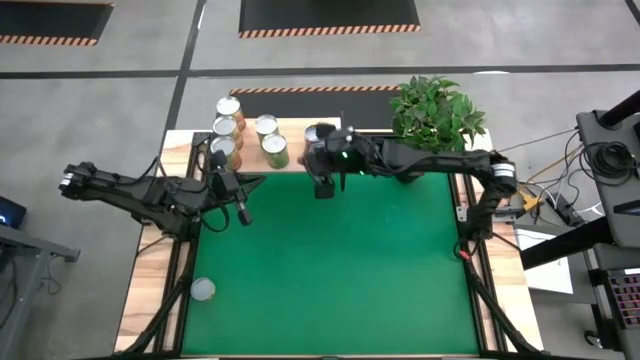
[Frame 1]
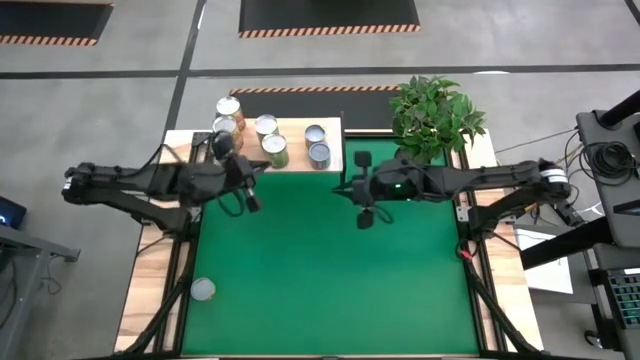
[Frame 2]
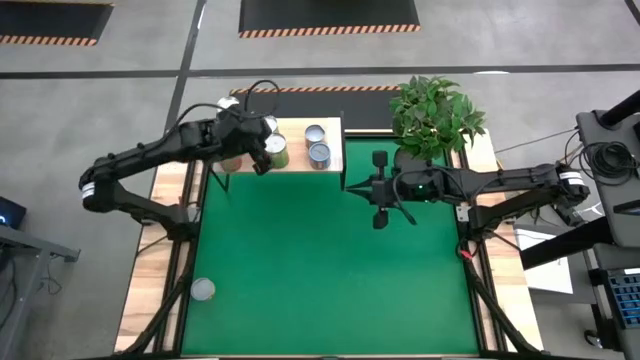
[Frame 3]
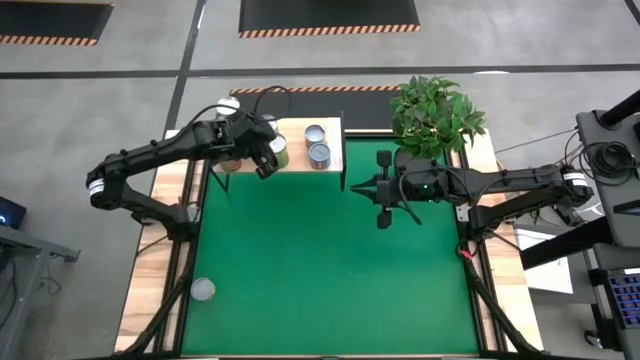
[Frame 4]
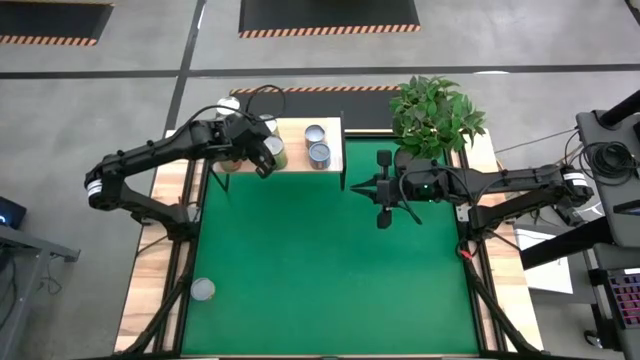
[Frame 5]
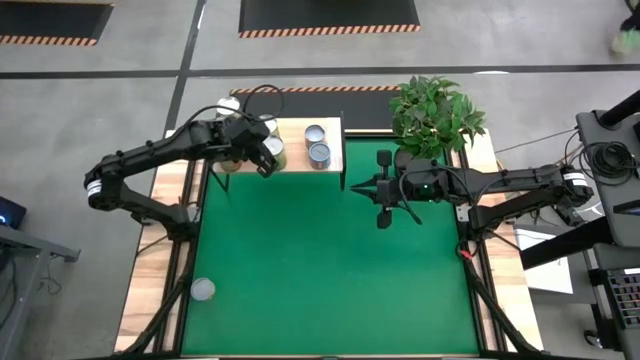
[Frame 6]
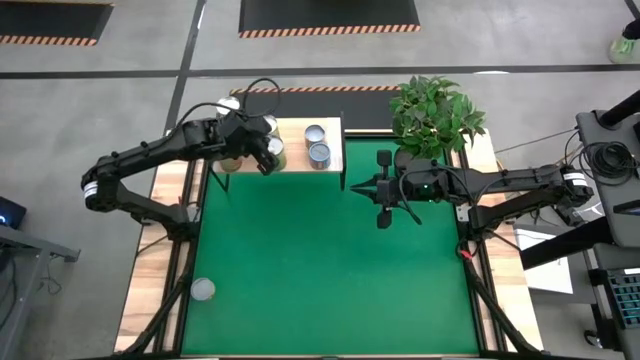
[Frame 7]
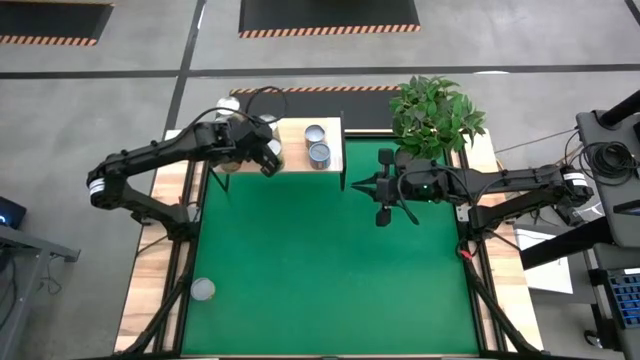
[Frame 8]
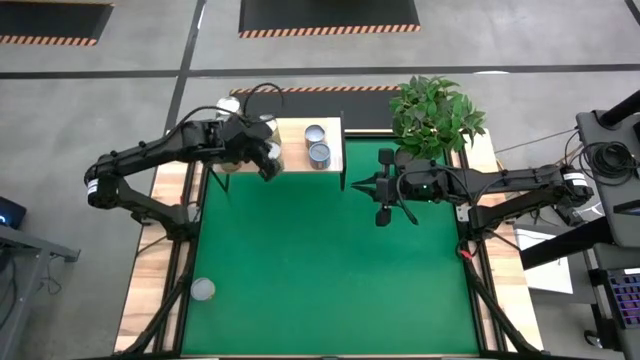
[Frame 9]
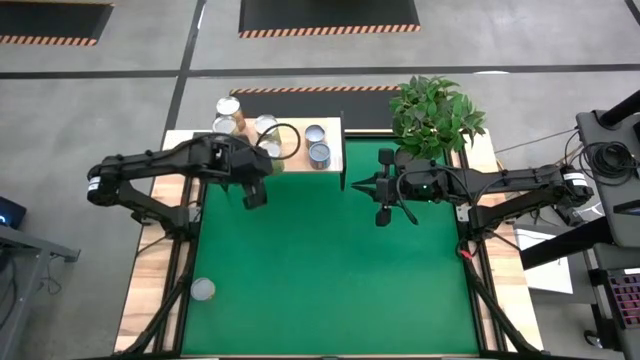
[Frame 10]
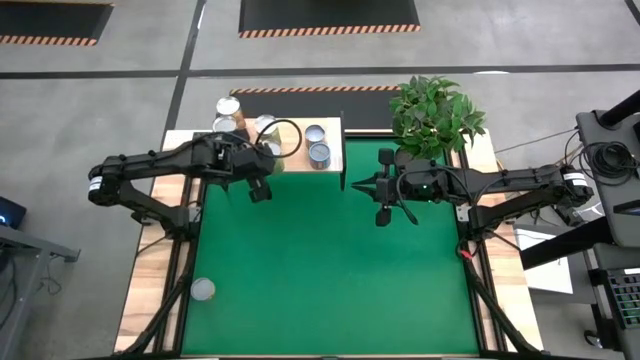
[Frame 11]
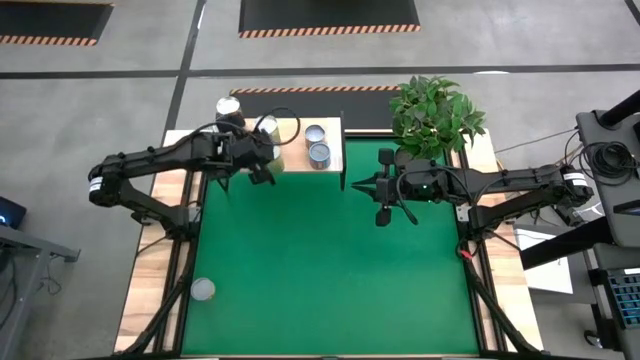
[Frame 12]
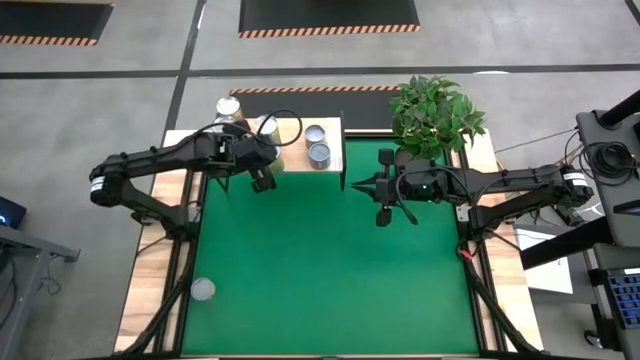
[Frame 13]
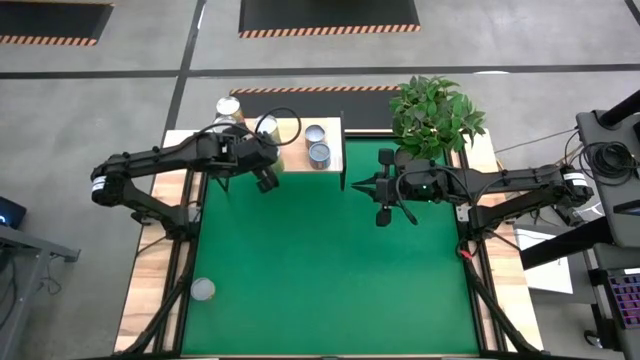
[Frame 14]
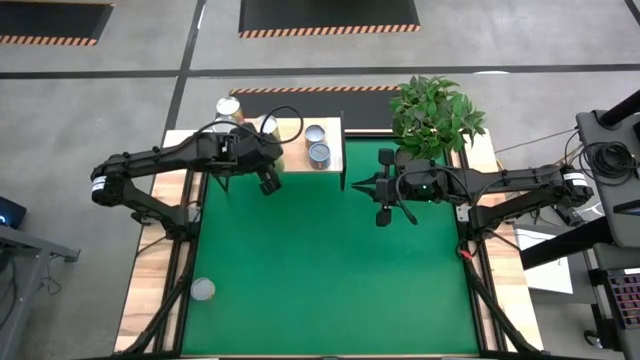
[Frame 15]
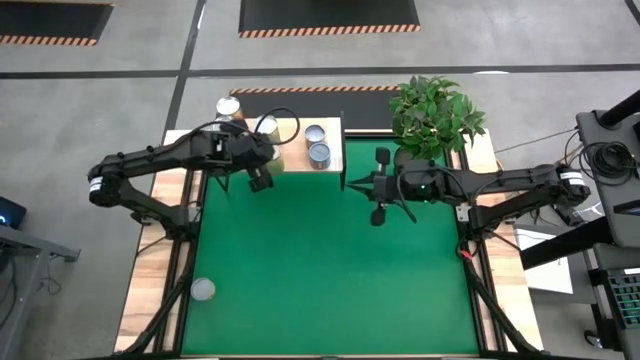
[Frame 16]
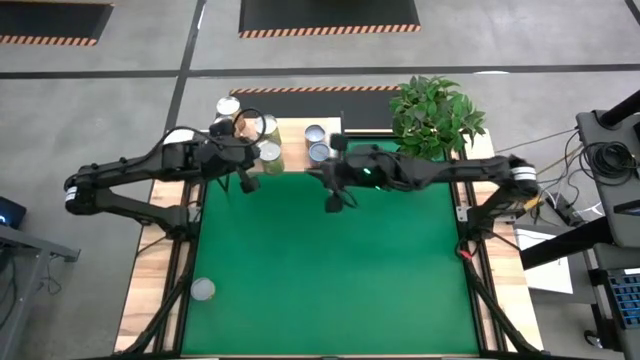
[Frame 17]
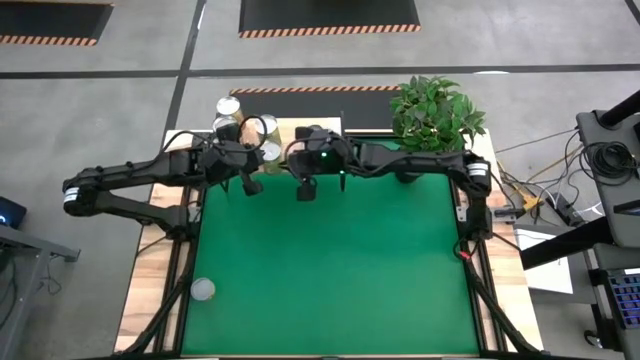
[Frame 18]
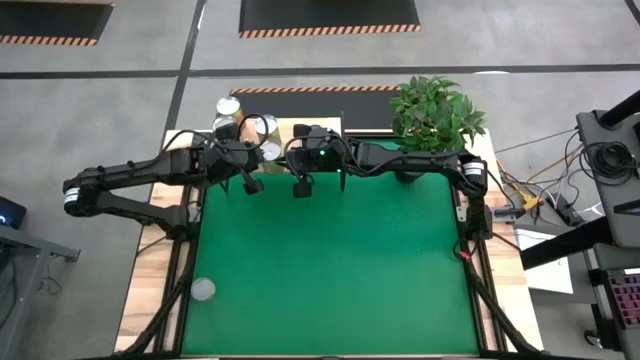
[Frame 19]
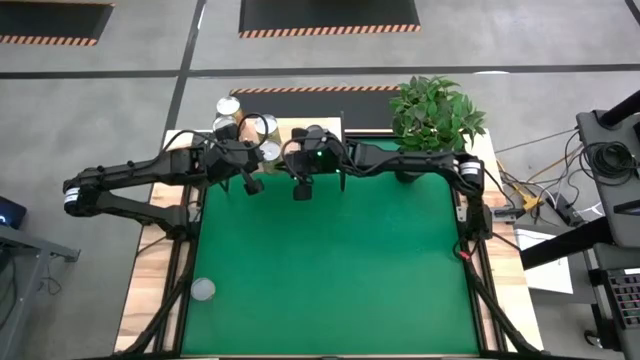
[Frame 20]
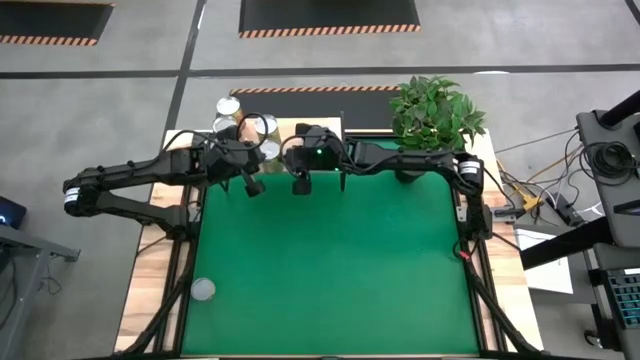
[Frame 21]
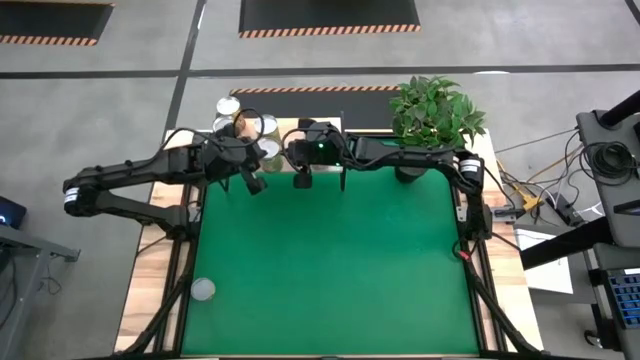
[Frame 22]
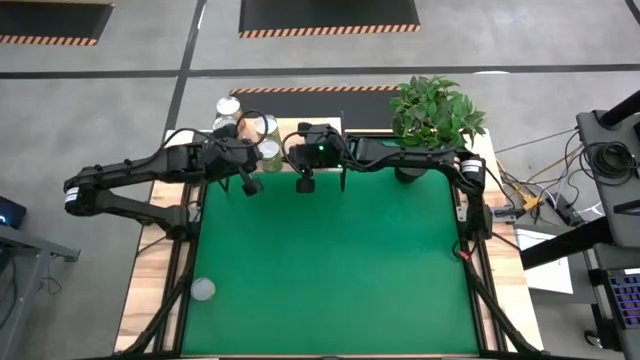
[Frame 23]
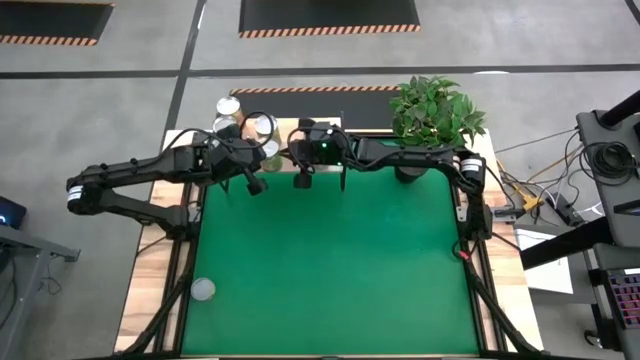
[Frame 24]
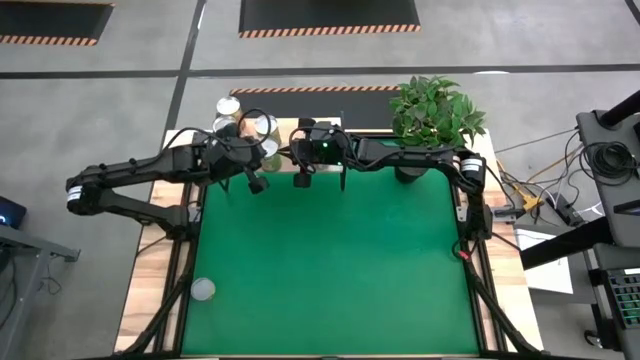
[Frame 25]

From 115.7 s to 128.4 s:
Task: Pick and place cans onto a shelf
Put the light green can on the shelf aligned with the light green can

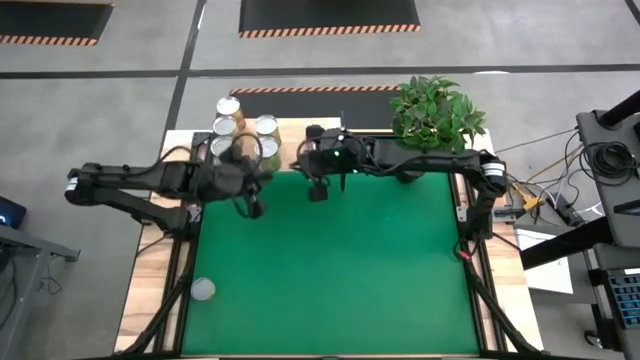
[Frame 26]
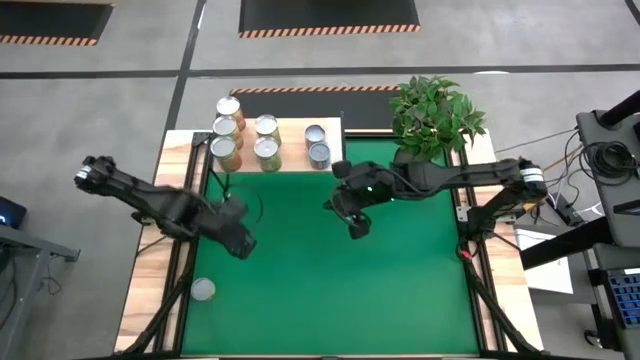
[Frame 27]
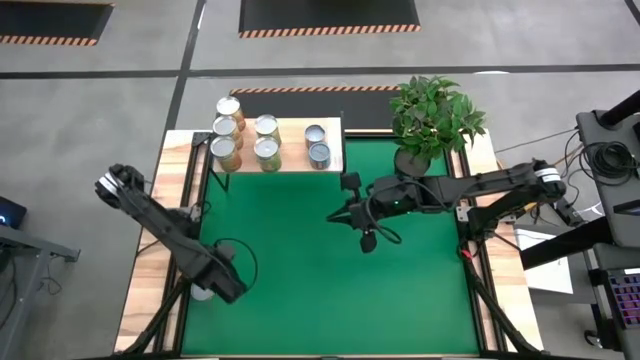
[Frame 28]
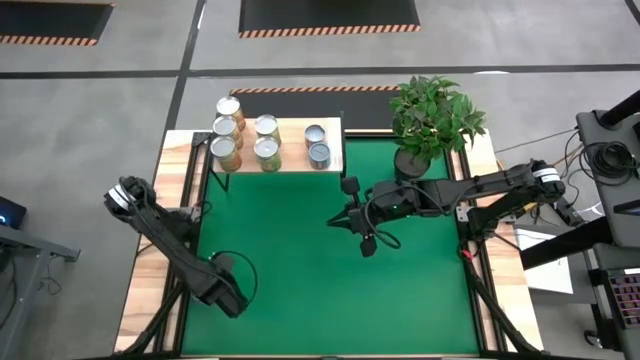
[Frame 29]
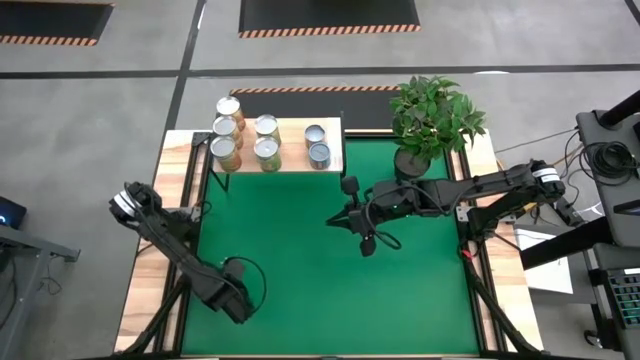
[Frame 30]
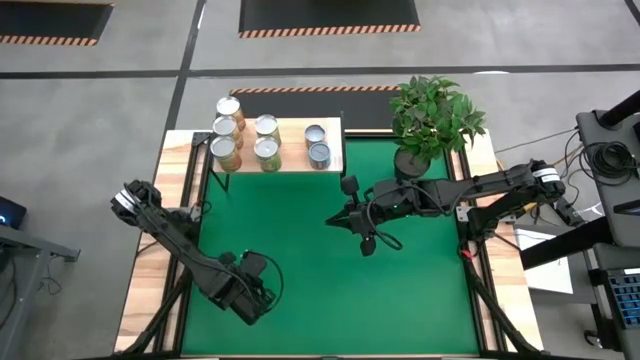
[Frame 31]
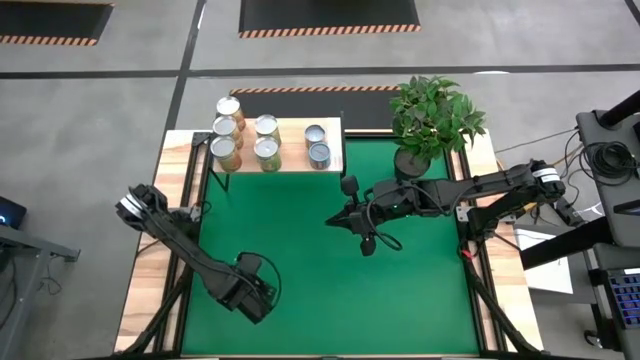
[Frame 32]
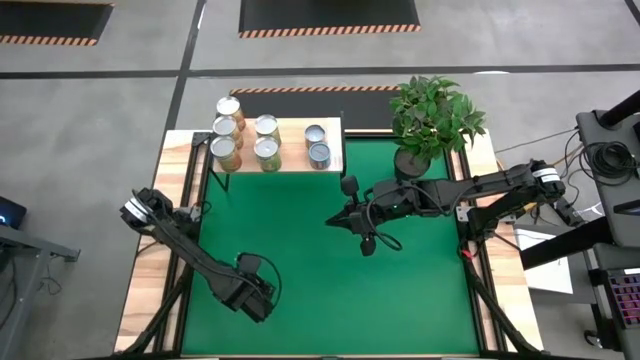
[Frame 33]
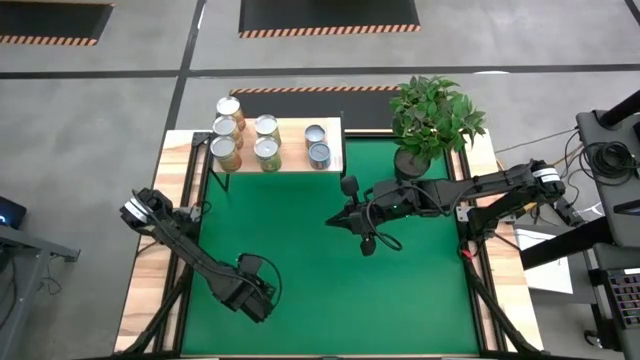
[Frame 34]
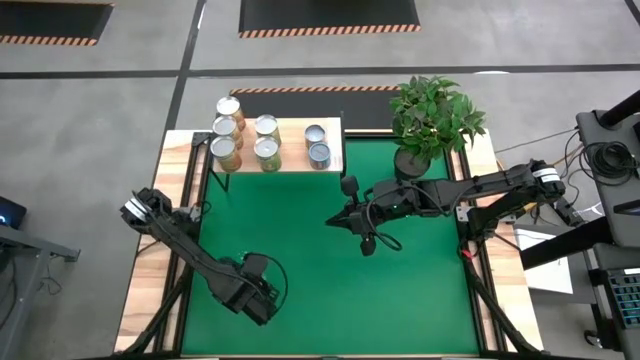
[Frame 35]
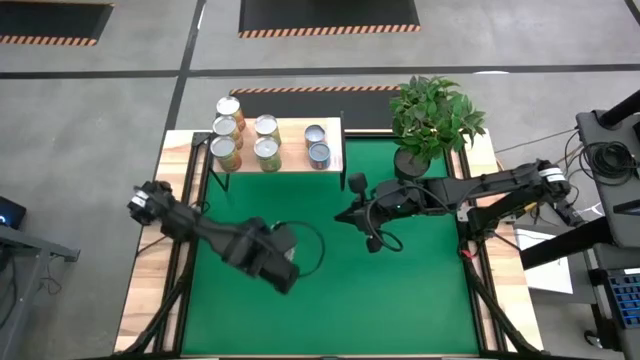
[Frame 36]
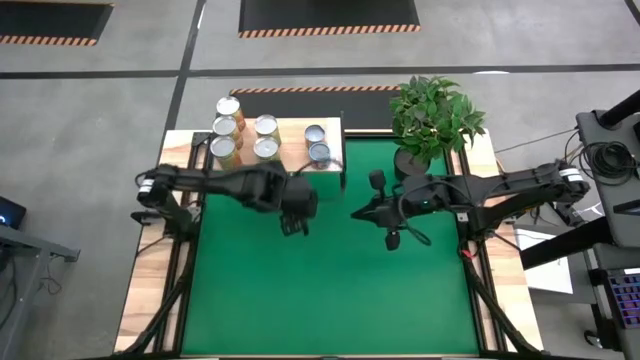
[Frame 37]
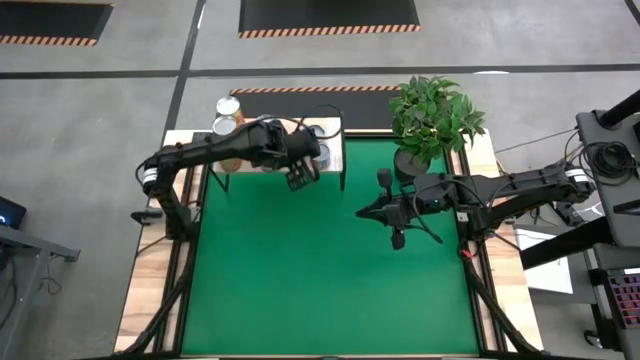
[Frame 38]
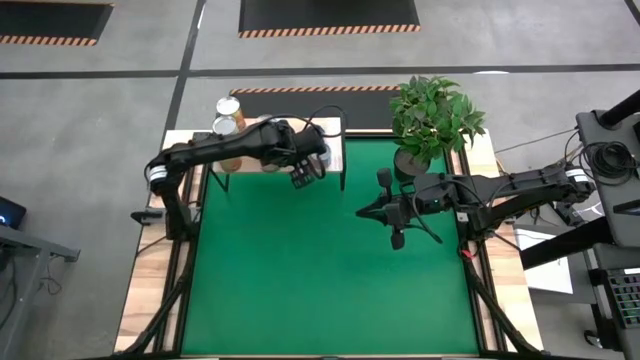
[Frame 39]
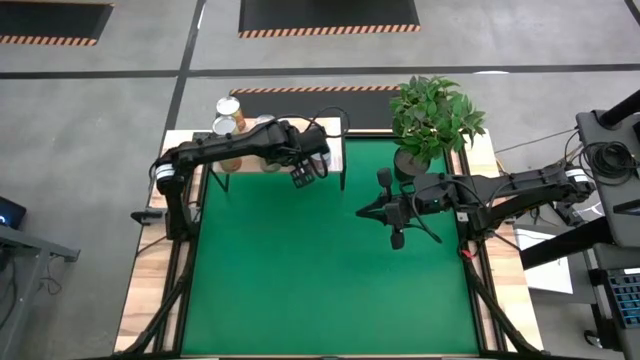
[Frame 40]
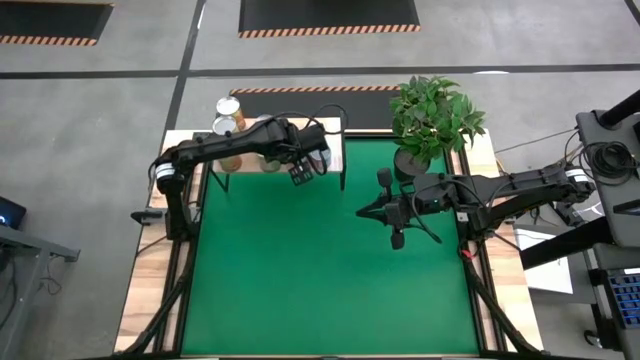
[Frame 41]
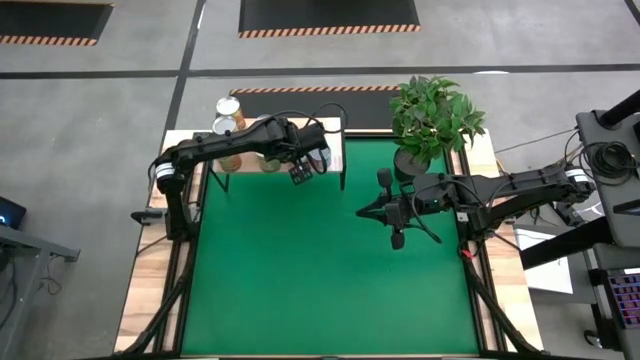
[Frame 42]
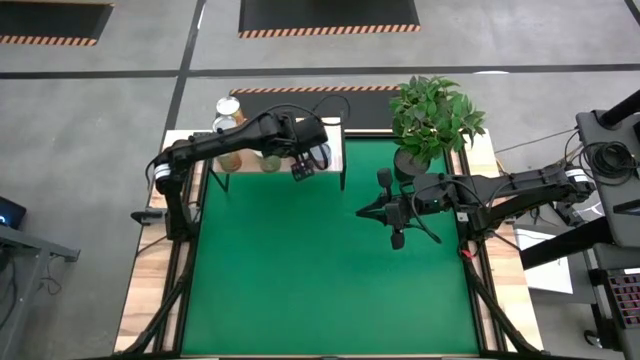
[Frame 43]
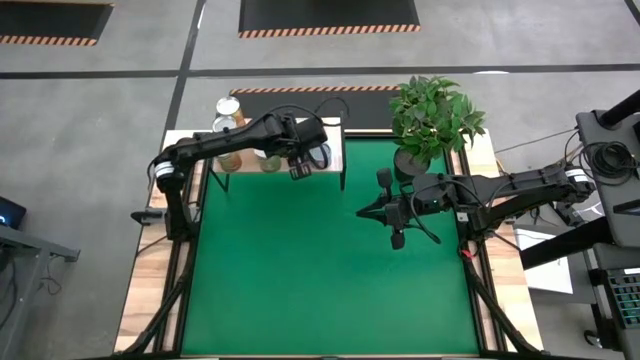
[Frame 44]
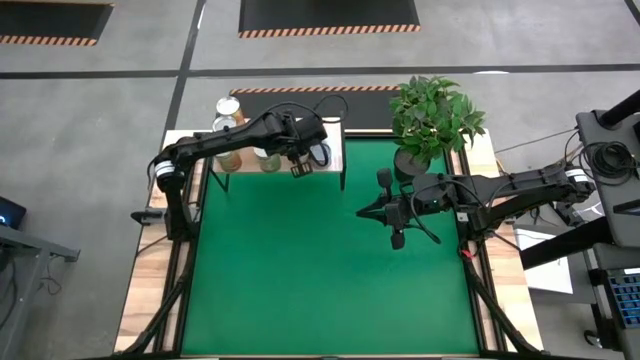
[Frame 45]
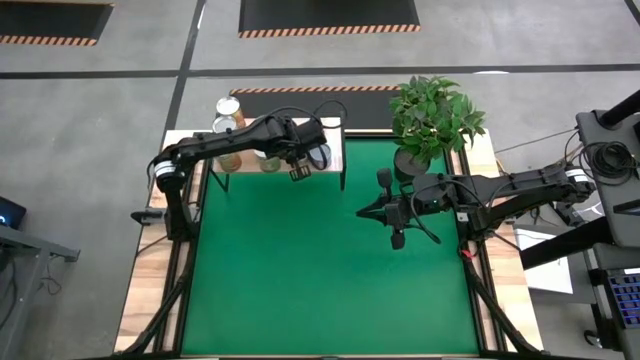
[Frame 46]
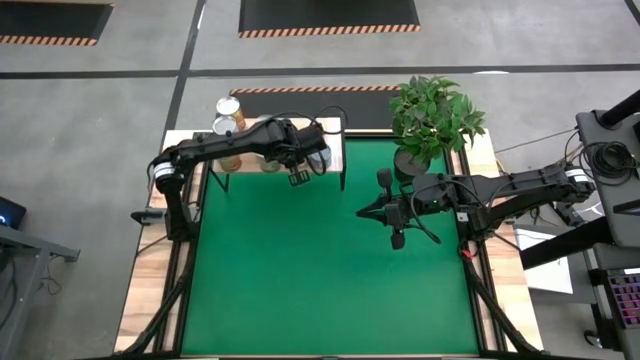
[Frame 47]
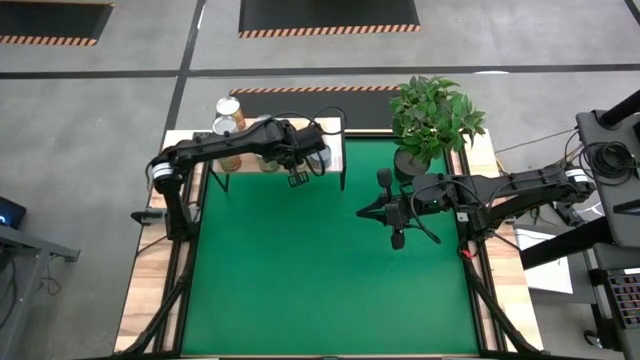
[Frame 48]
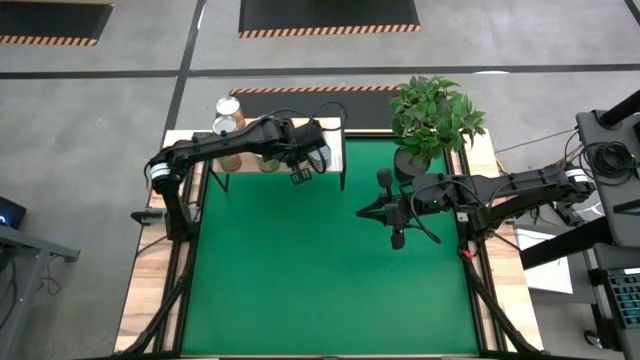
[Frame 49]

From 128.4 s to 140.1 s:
Put the green can on the shelf
